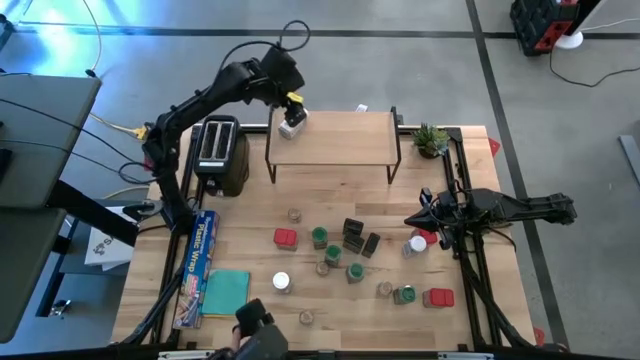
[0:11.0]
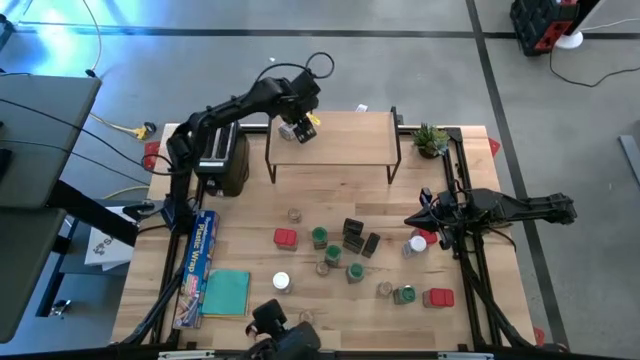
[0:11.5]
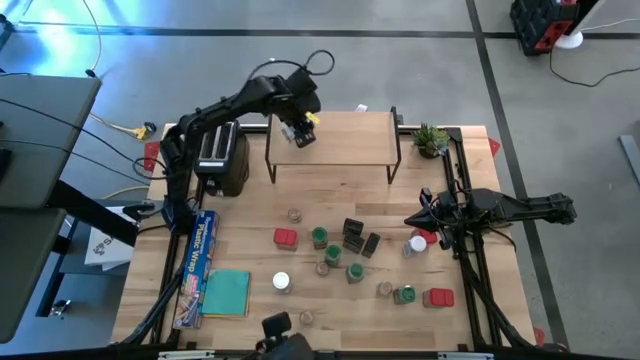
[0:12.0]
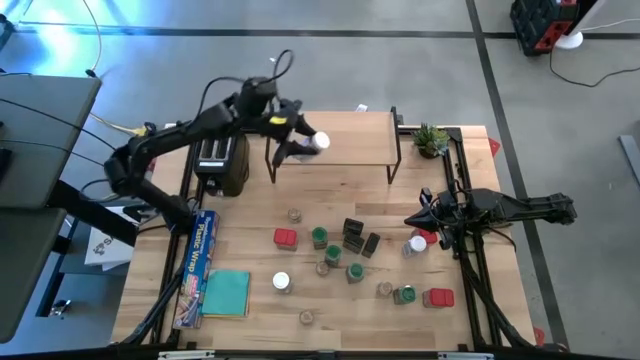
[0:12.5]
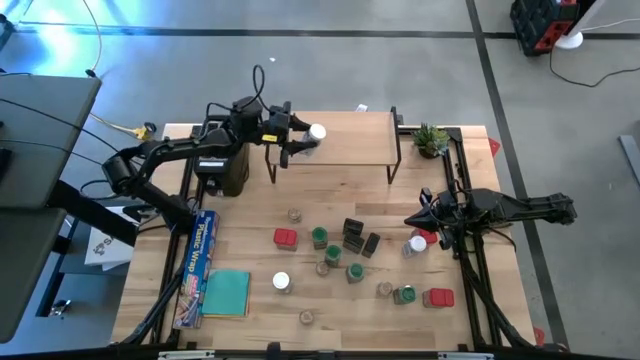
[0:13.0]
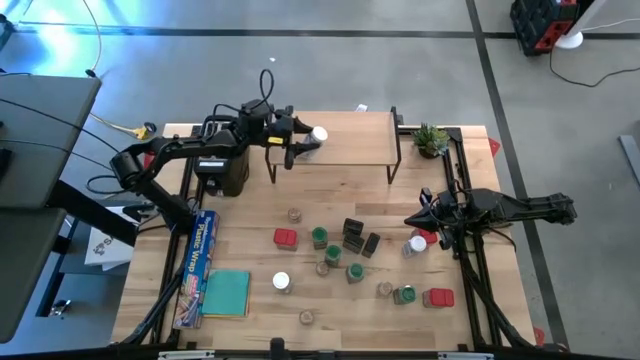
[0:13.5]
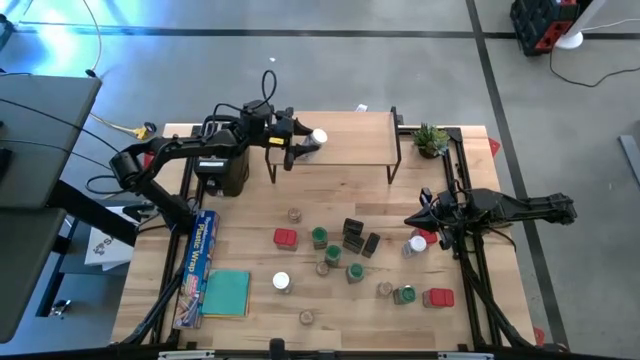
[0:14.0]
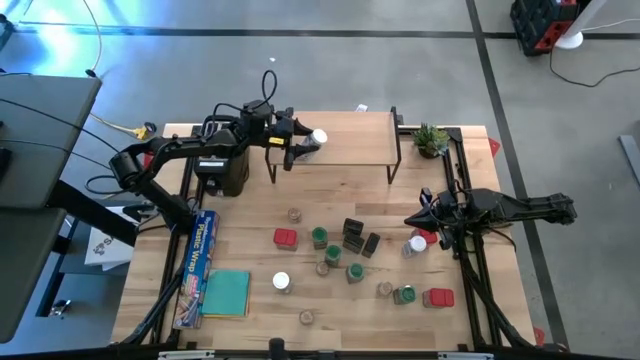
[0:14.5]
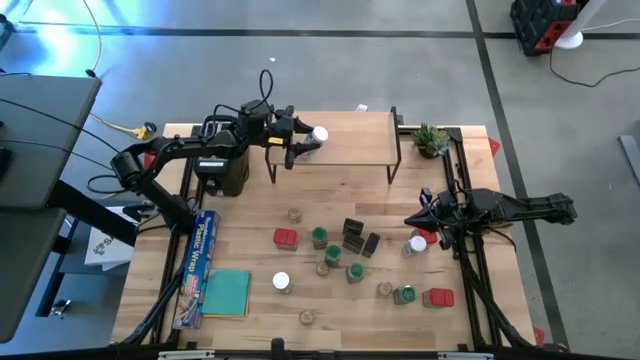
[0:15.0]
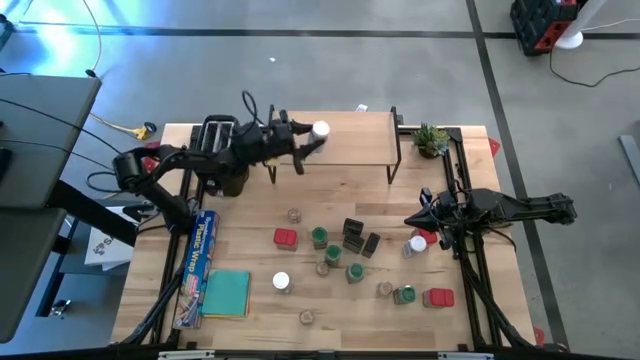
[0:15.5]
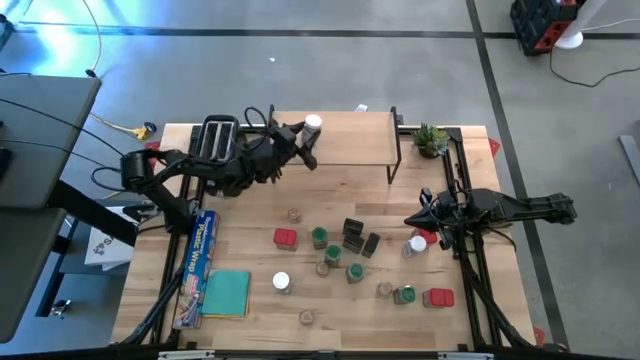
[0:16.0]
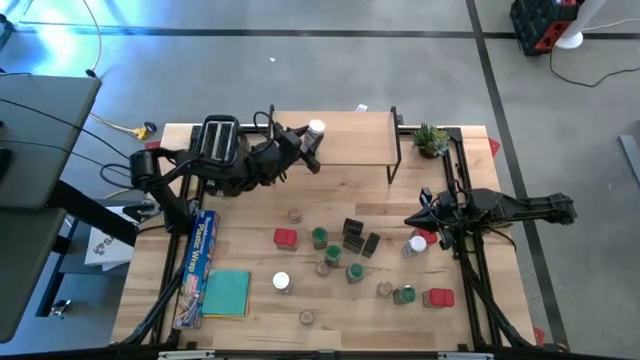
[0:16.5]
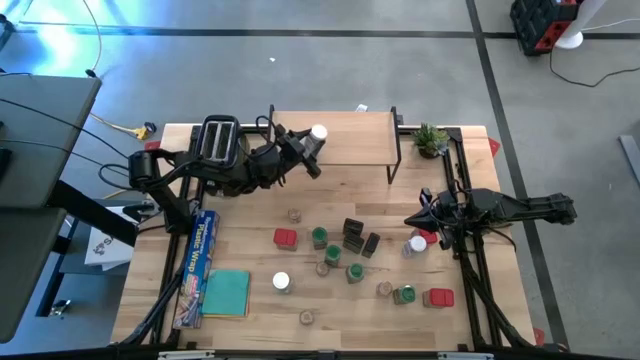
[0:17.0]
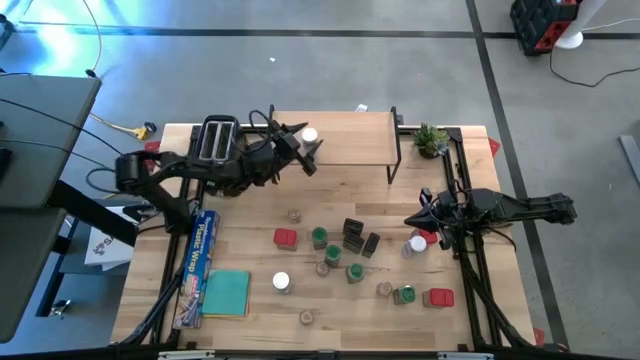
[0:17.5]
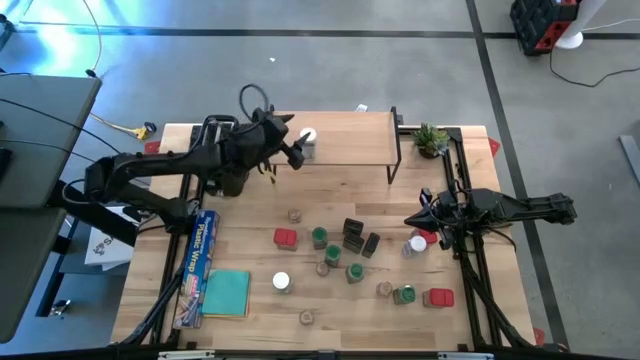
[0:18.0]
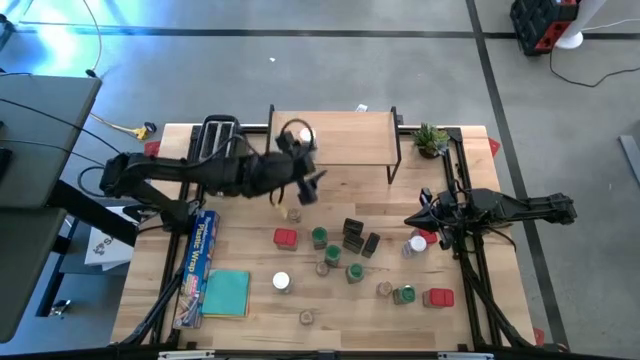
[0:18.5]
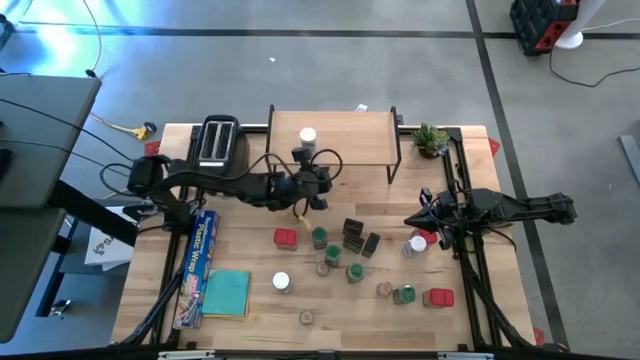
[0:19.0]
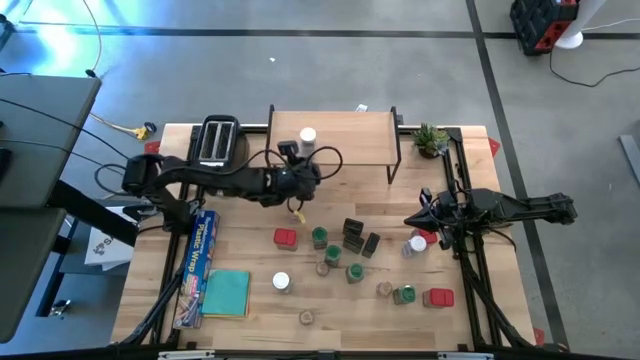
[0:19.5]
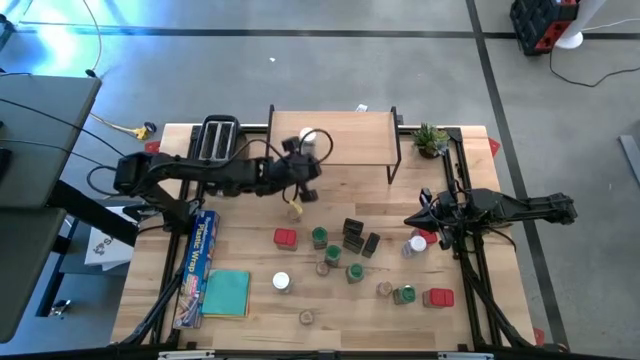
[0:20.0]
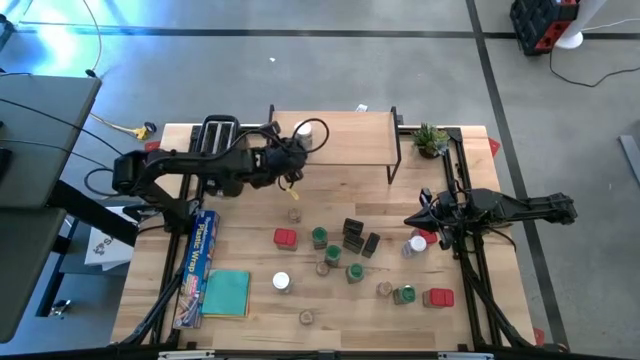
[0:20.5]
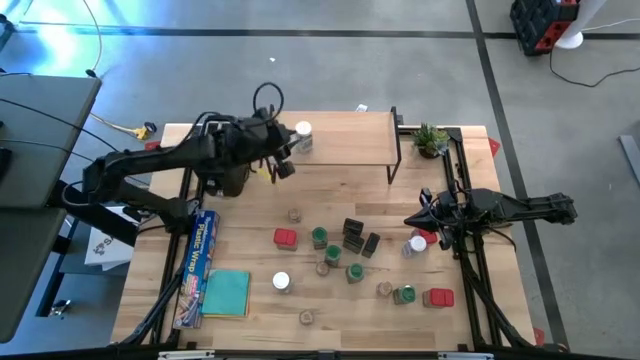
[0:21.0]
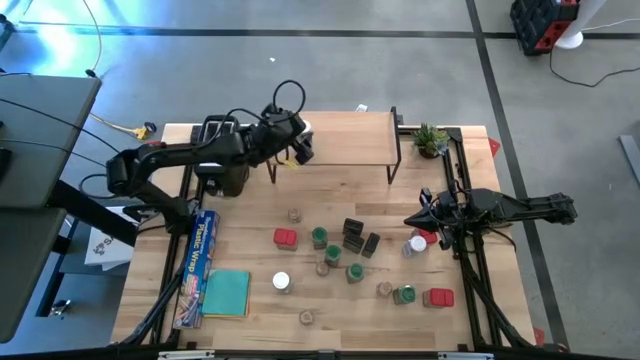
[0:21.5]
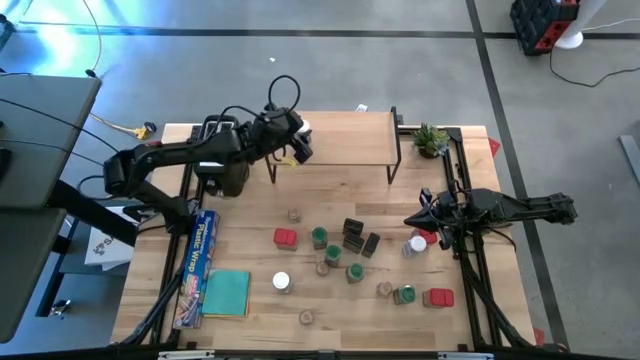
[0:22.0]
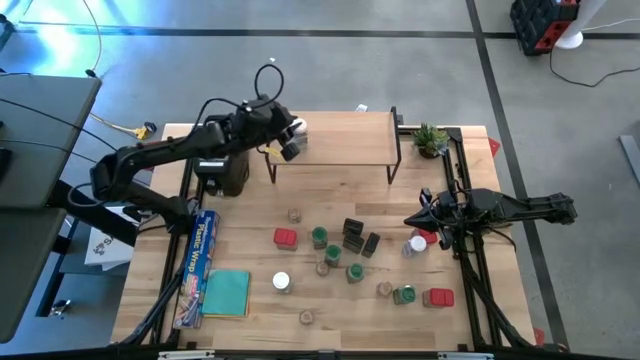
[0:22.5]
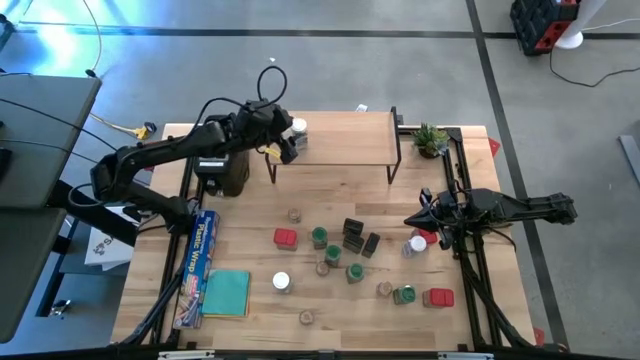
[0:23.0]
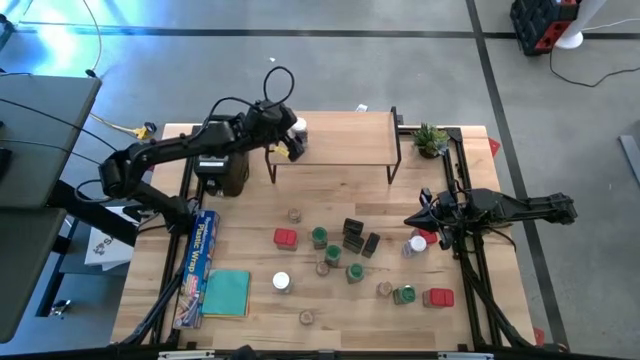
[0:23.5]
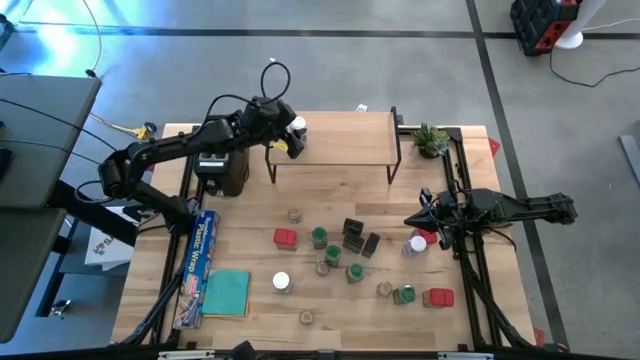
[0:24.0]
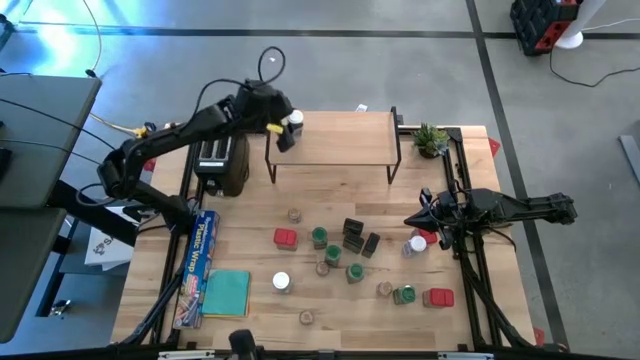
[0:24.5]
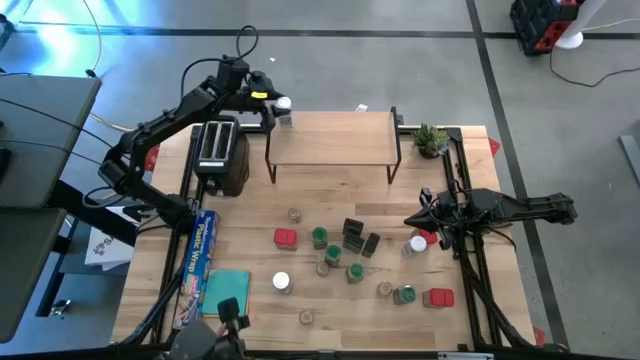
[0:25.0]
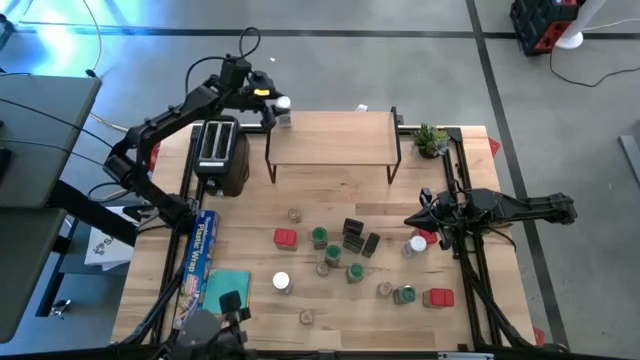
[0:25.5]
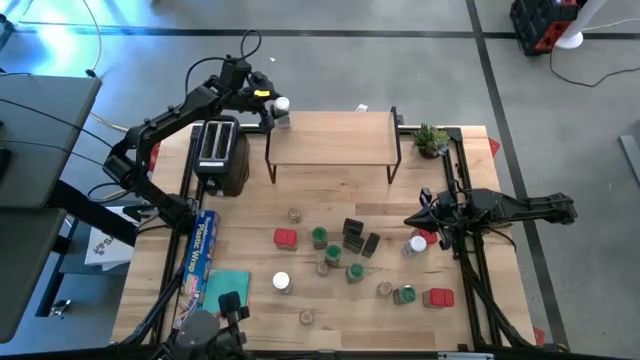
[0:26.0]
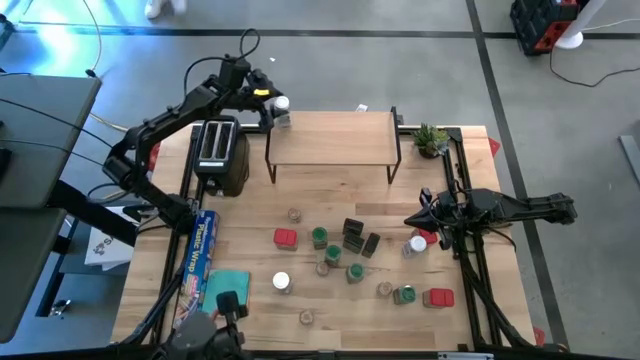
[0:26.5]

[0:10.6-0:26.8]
Task: Shelf spices
Put the top left white seasoning bottle on the shelf

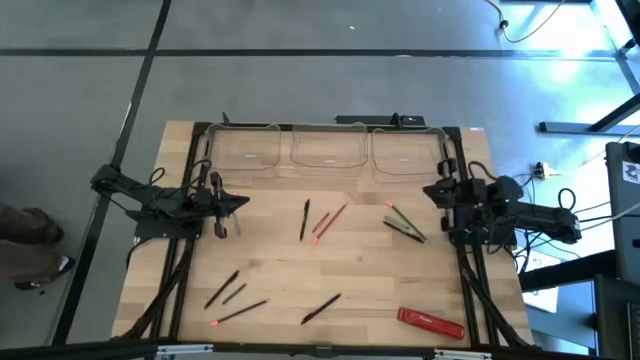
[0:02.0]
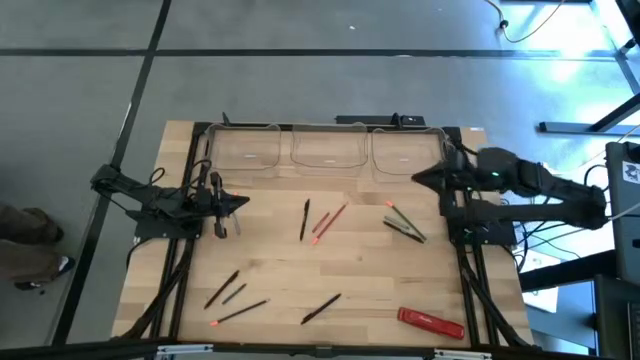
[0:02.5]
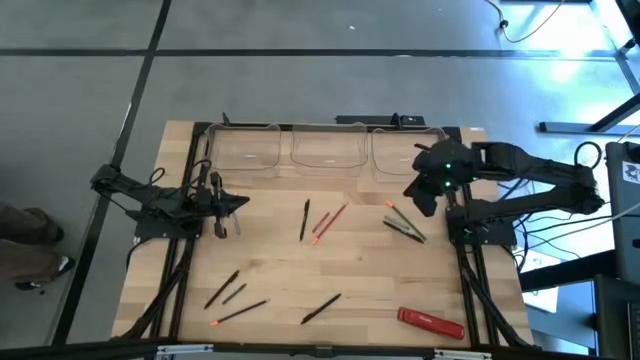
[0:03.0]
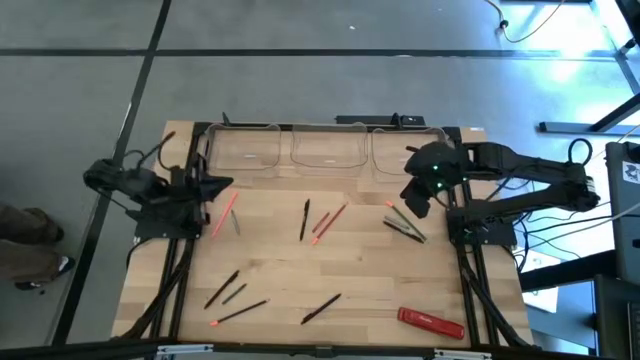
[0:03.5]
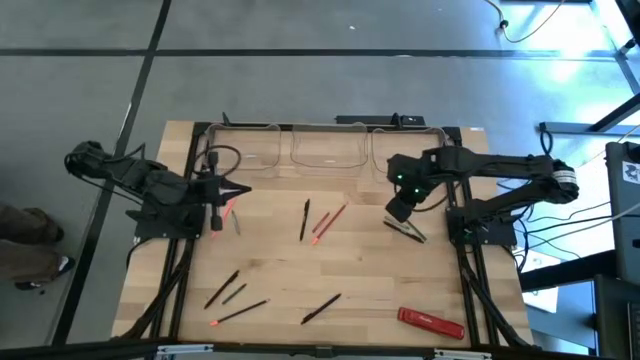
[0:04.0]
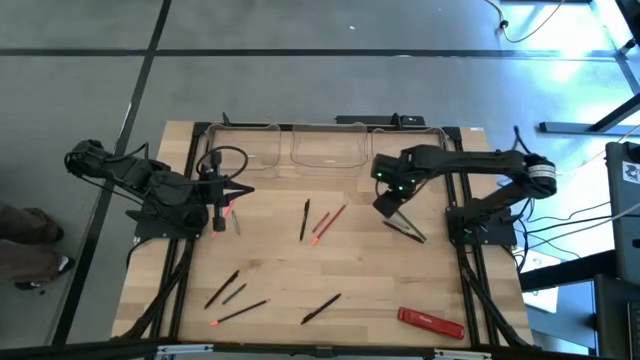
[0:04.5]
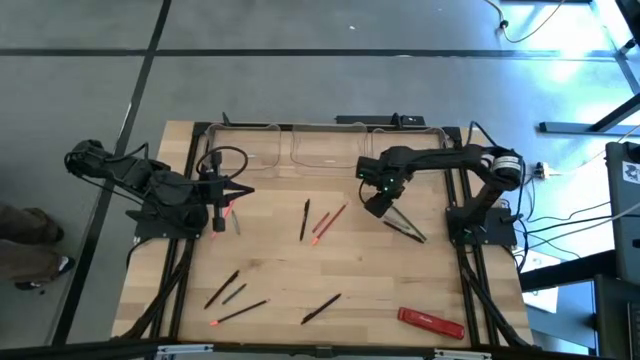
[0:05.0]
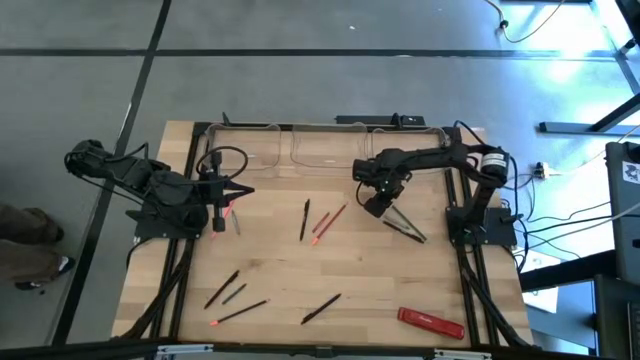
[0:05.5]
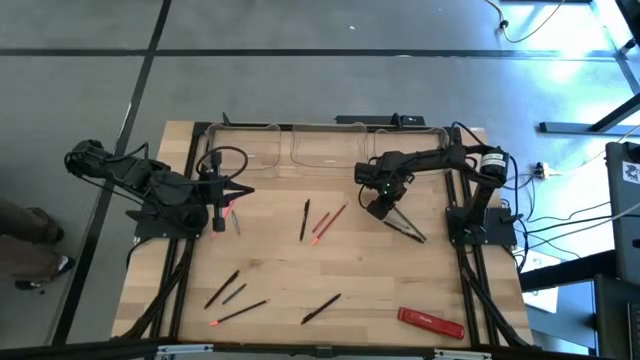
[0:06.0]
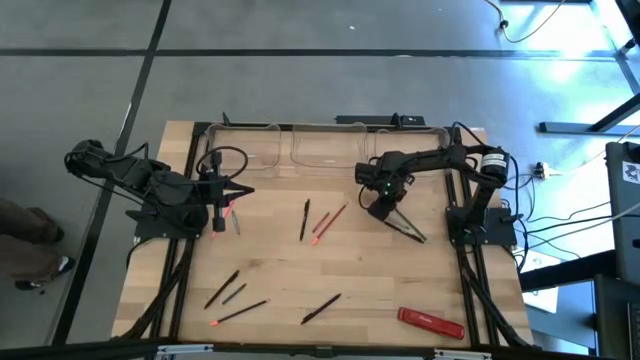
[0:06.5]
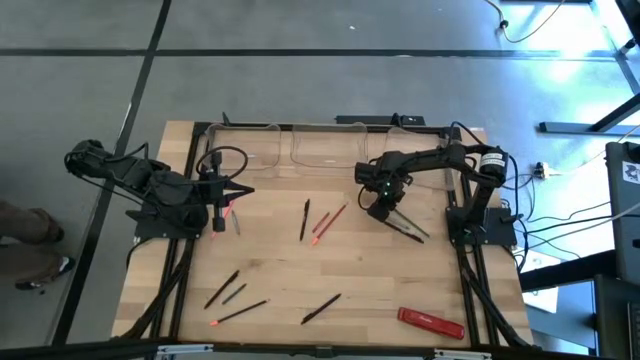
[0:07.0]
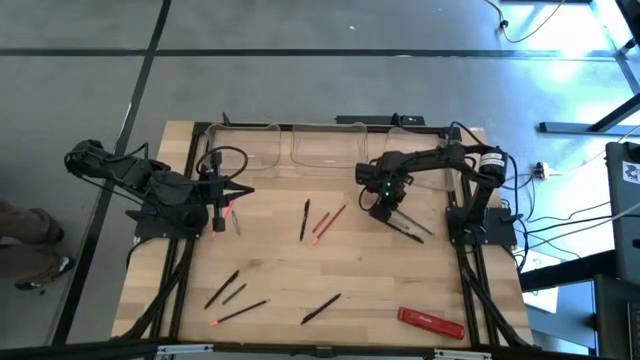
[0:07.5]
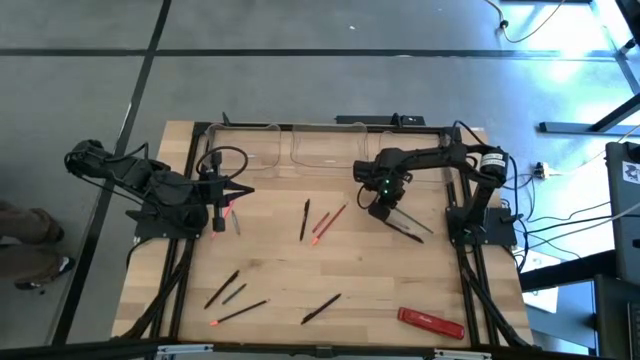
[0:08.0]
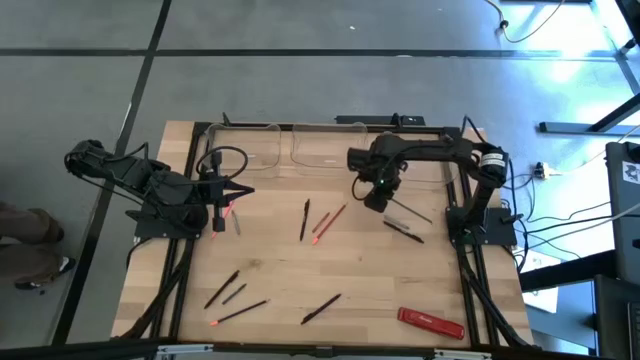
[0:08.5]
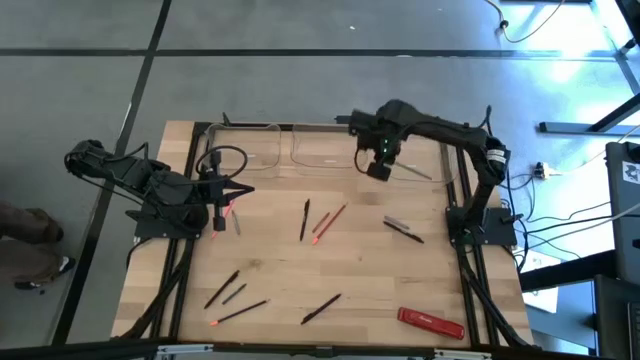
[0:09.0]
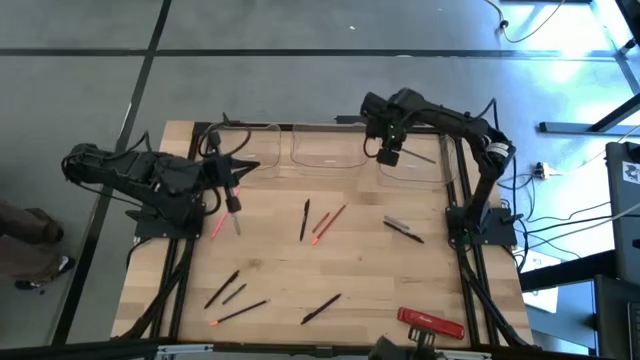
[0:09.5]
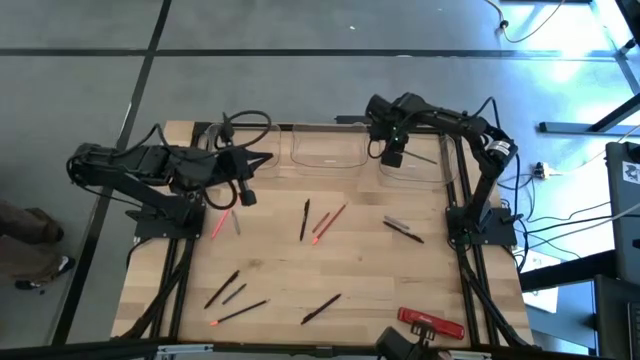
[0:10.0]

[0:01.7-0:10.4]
Task: Sort crayons/erasers/pens/pencils in bins
Put the green pencil into the right transparent bin
